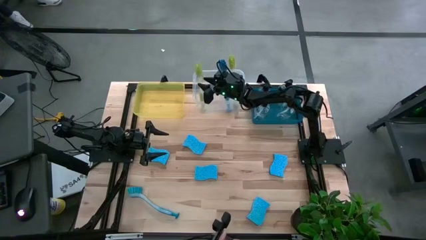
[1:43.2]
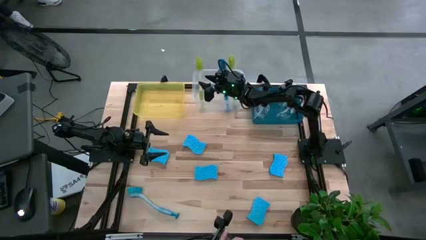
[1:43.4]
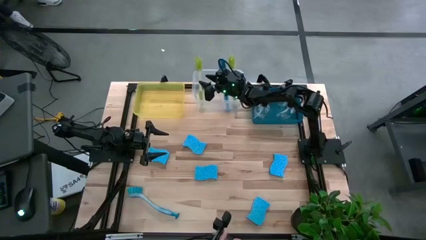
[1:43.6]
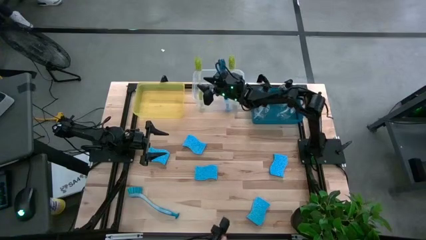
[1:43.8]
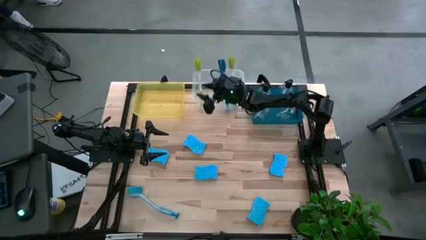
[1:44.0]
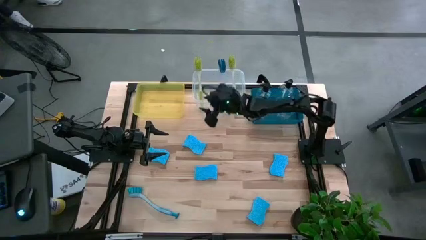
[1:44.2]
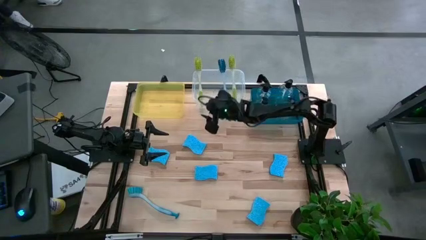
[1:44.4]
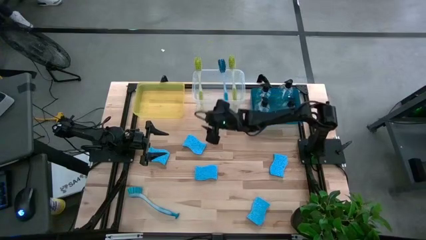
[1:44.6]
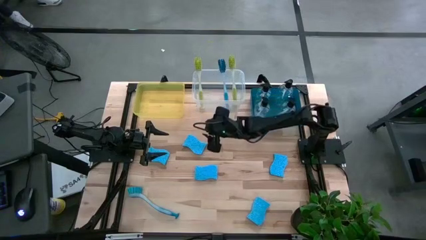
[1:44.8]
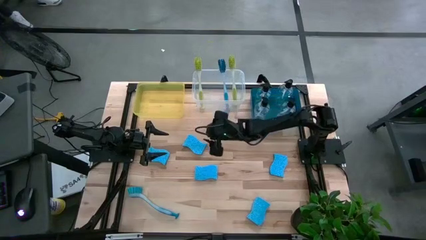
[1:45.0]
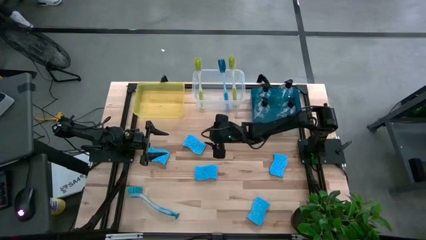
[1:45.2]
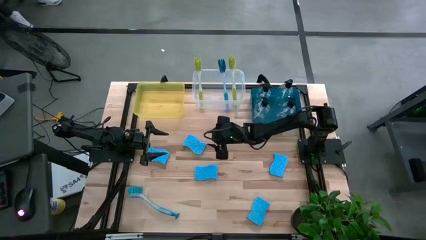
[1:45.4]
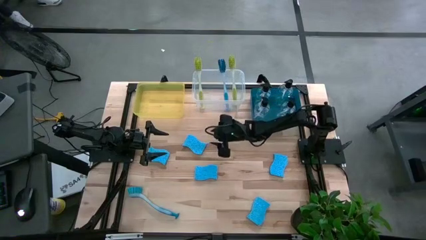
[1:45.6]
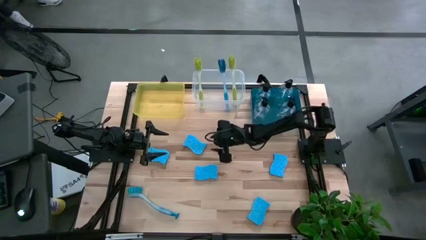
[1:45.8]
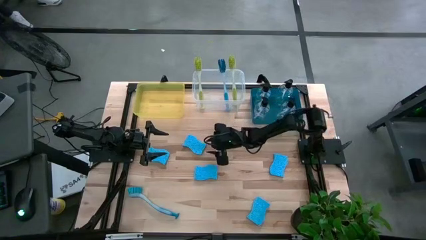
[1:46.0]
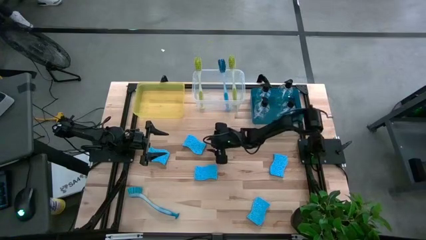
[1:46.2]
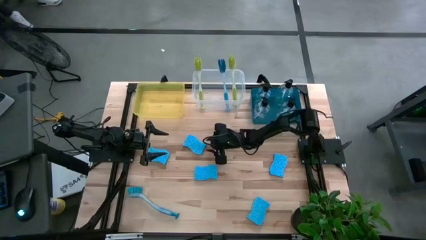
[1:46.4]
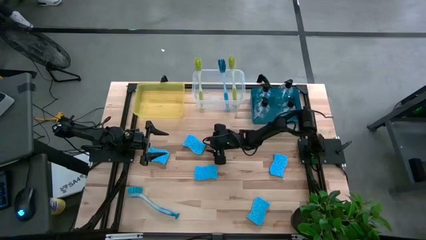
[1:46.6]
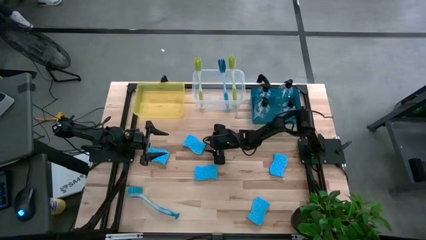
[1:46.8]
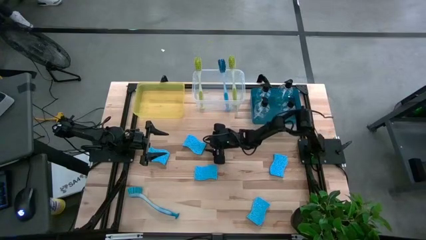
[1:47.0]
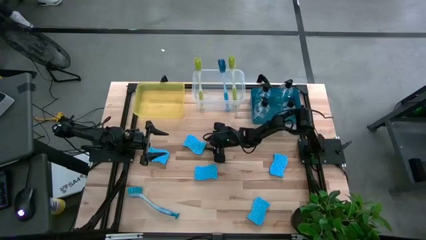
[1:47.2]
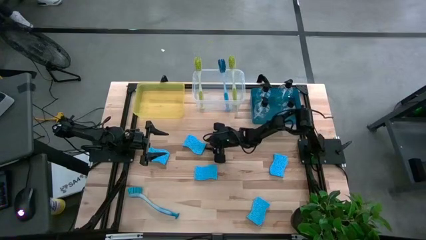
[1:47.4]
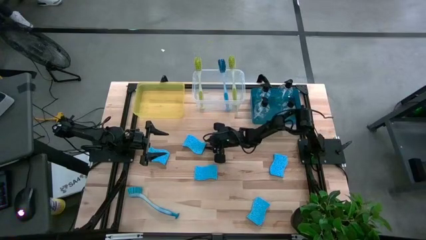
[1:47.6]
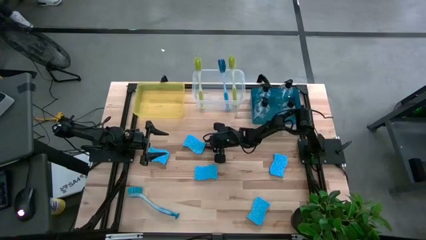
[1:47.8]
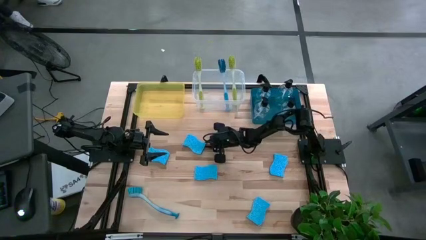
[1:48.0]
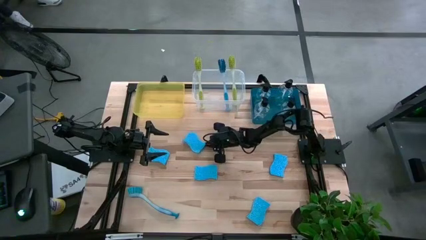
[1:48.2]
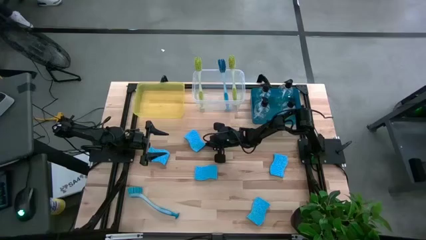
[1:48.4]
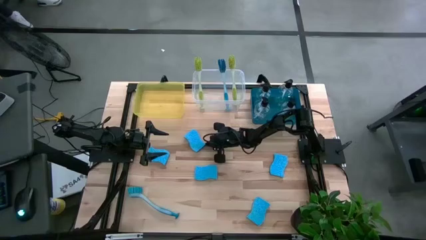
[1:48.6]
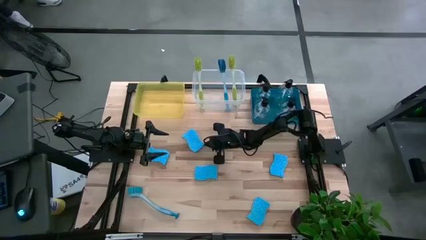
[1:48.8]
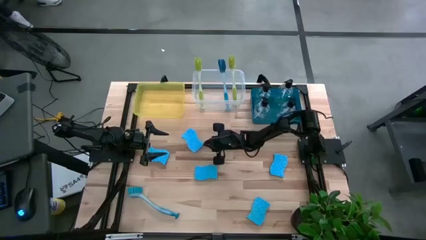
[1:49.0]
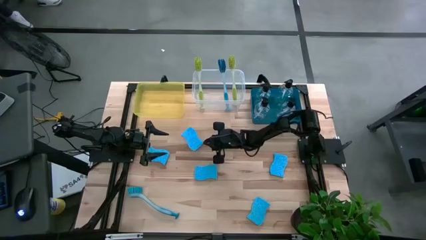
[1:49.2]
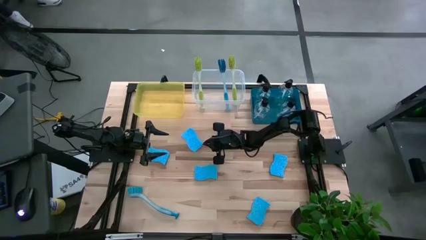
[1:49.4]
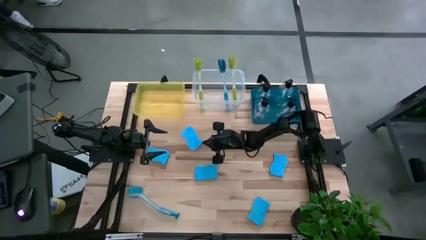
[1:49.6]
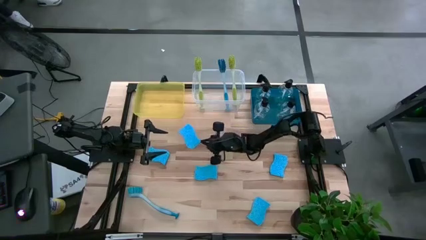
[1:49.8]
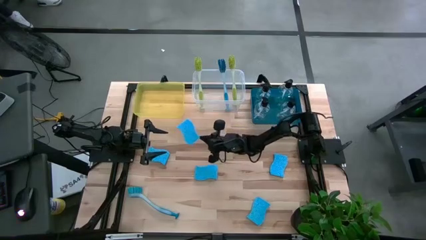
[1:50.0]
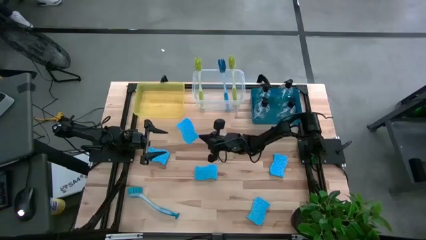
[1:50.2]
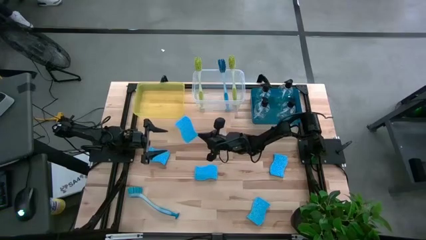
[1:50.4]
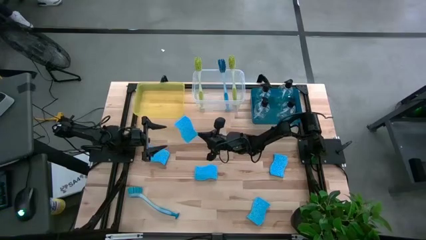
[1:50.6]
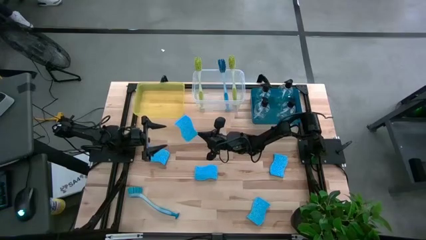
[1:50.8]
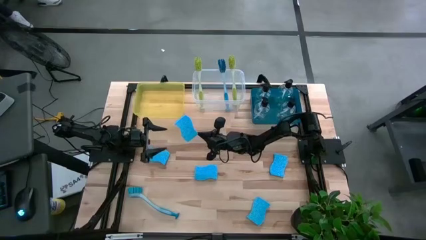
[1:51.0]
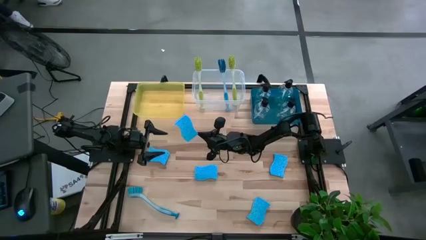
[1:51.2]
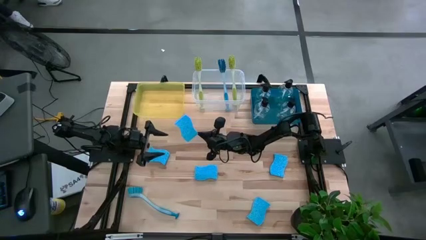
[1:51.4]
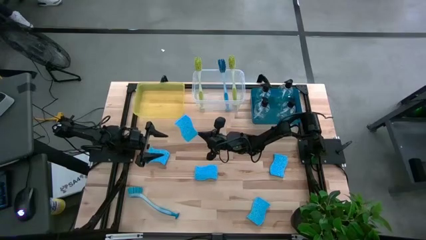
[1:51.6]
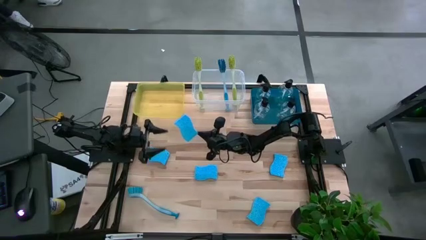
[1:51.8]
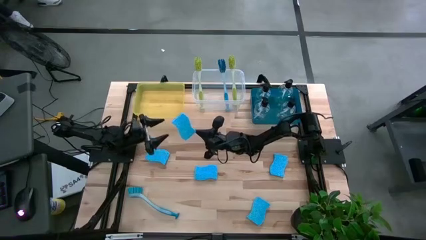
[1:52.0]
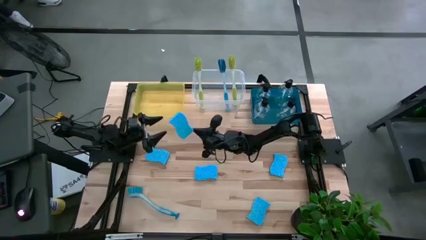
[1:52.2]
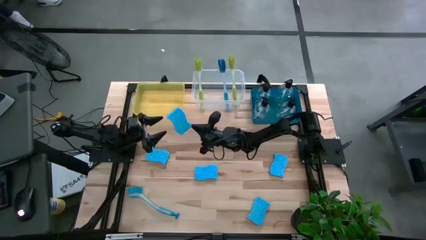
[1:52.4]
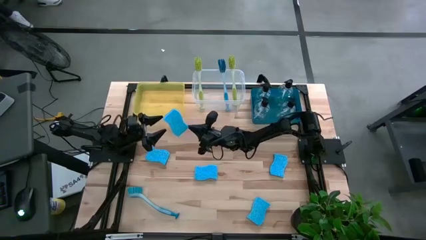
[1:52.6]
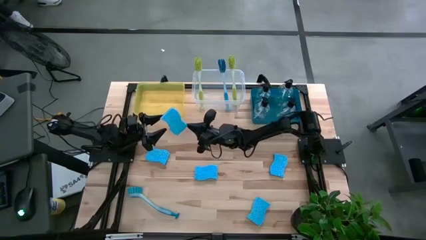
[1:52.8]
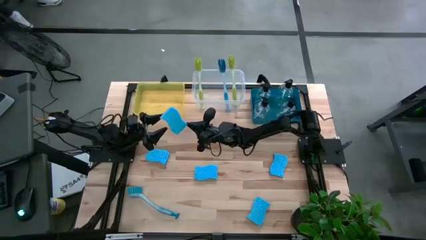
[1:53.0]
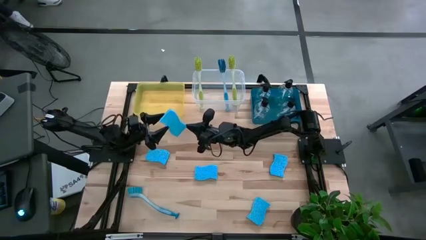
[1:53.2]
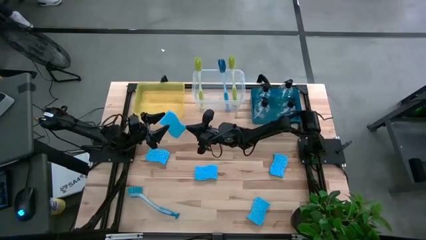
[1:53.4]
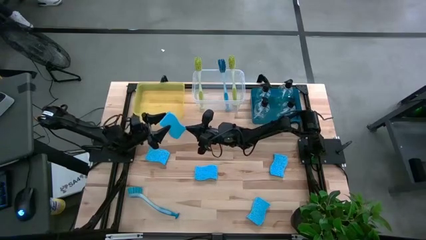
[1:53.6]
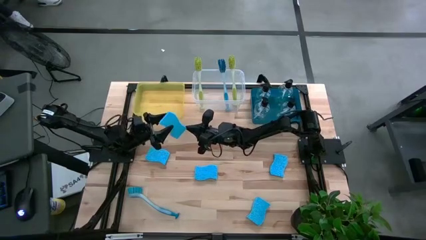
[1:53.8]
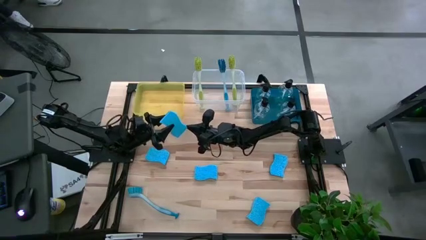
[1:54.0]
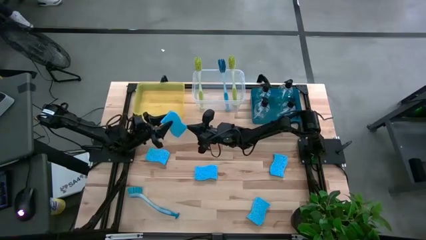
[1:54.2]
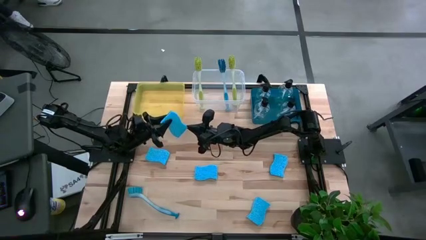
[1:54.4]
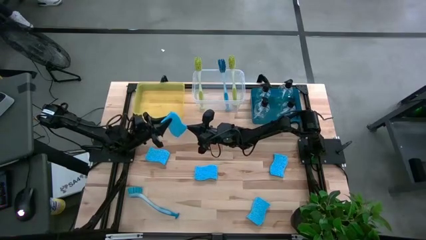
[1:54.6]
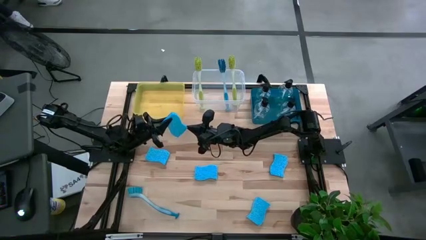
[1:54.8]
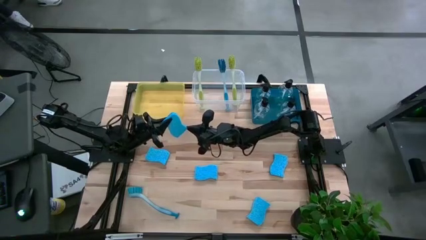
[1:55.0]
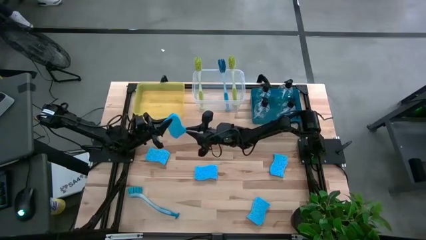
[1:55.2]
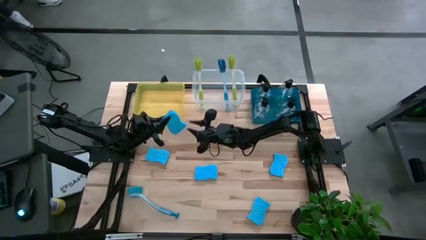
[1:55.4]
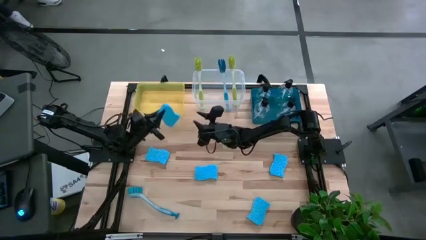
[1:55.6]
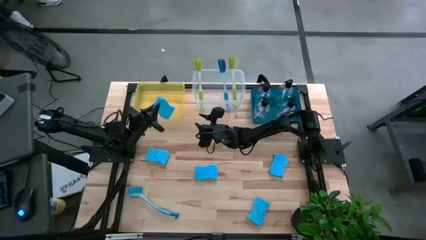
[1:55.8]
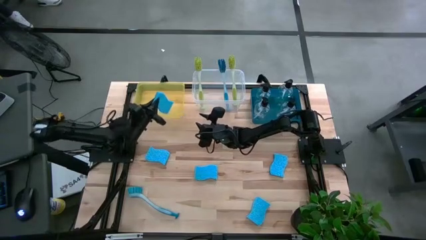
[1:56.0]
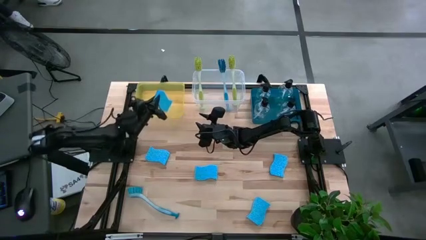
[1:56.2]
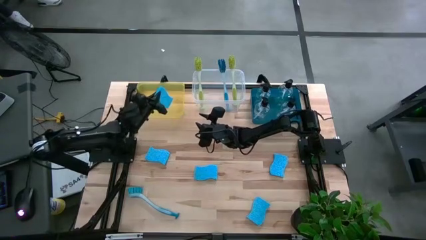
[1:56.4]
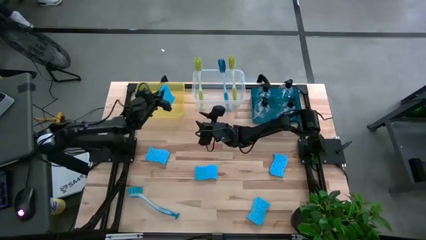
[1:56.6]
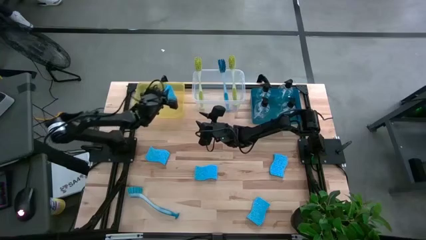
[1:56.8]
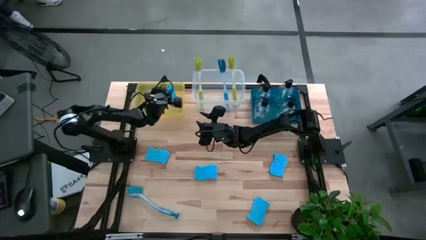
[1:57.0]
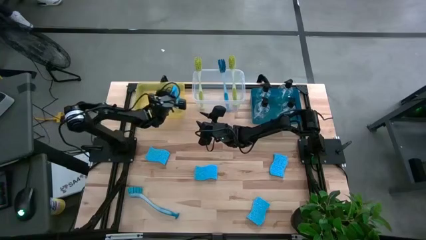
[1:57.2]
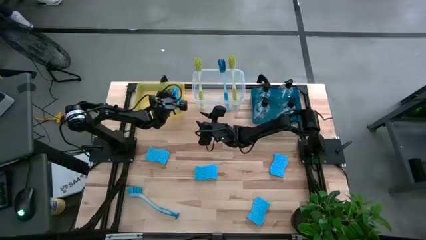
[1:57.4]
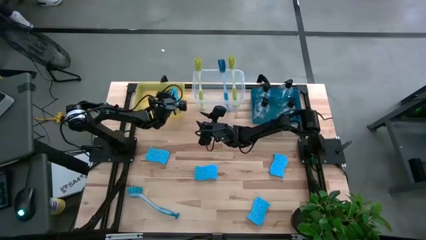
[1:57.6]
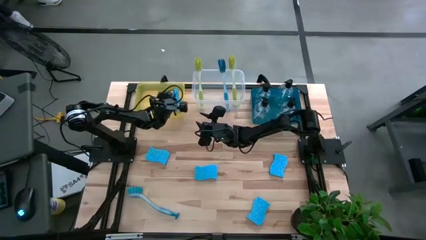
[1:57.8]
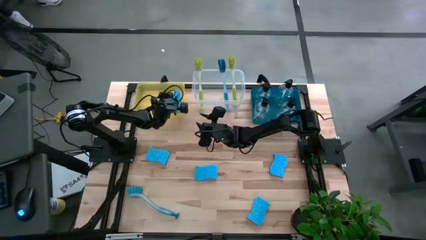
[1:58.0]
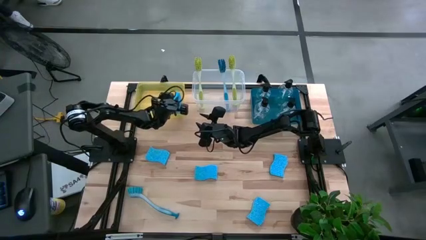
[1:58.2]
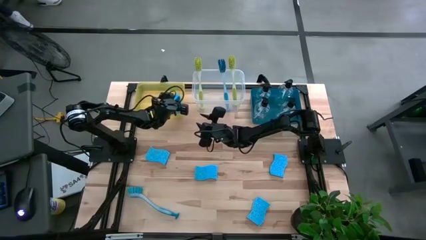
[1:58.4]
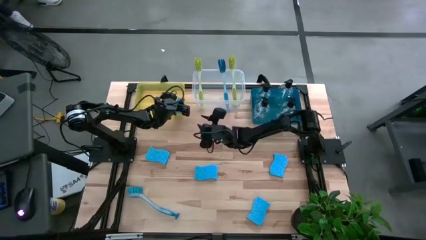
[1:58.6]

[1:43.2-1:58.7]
Task: Pick & Place Kitchen Sink Supplies
Put the blue sponge into the yellow bin
